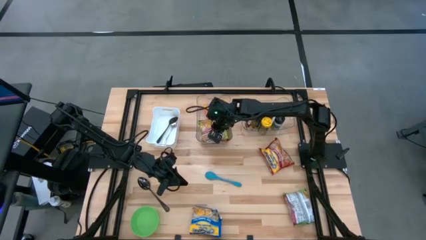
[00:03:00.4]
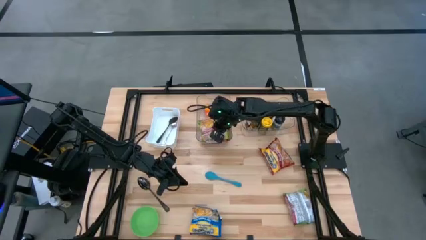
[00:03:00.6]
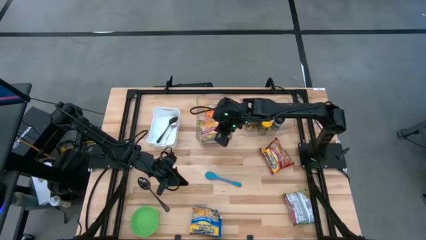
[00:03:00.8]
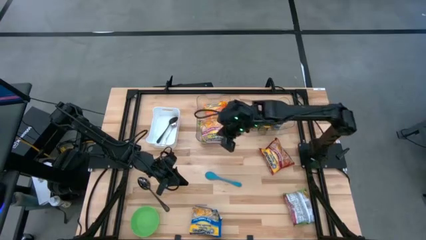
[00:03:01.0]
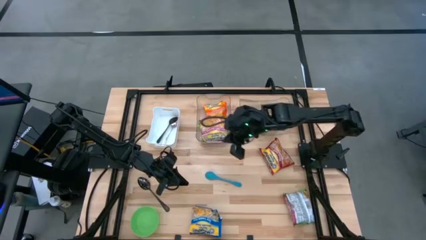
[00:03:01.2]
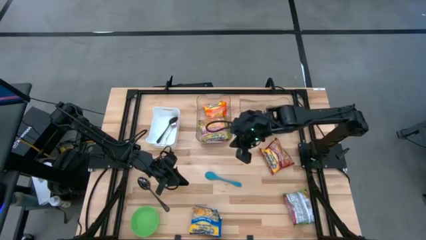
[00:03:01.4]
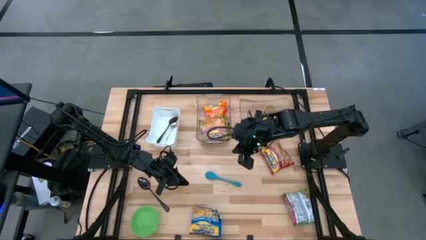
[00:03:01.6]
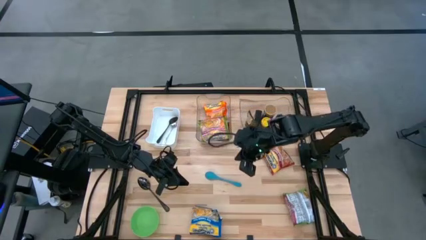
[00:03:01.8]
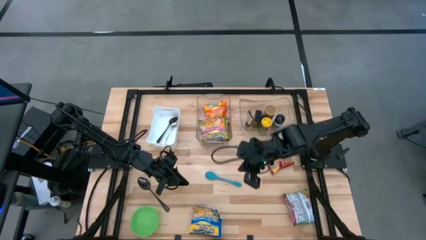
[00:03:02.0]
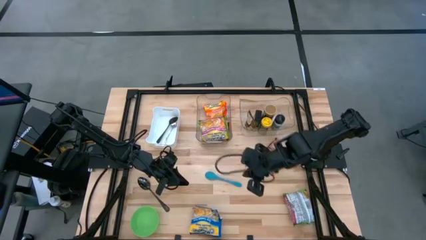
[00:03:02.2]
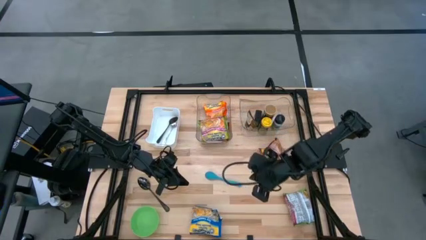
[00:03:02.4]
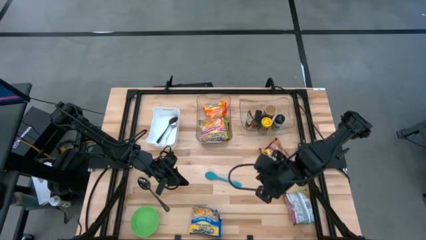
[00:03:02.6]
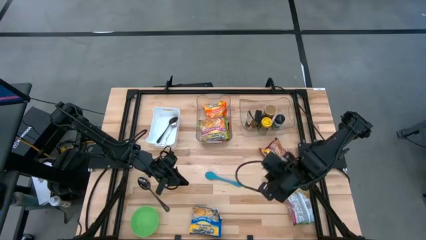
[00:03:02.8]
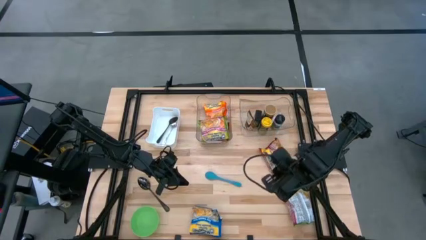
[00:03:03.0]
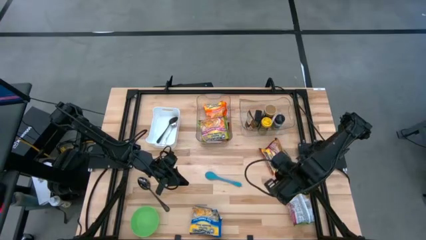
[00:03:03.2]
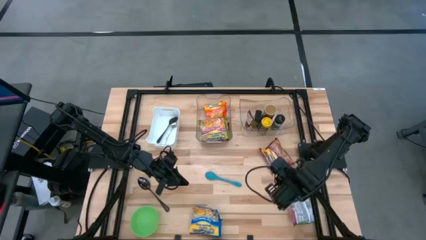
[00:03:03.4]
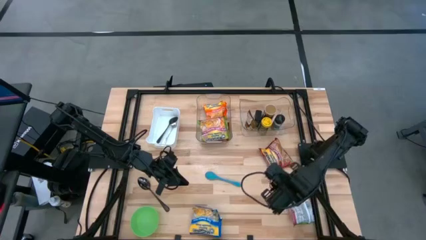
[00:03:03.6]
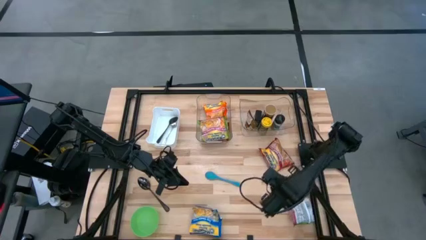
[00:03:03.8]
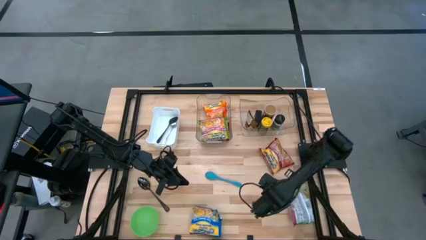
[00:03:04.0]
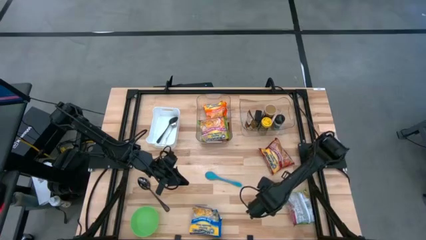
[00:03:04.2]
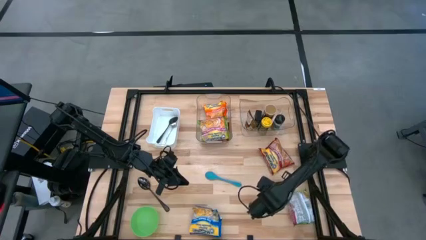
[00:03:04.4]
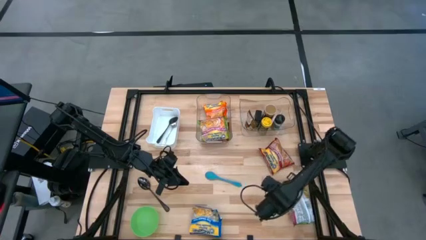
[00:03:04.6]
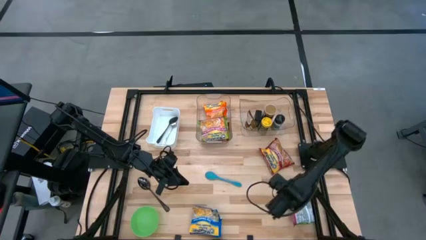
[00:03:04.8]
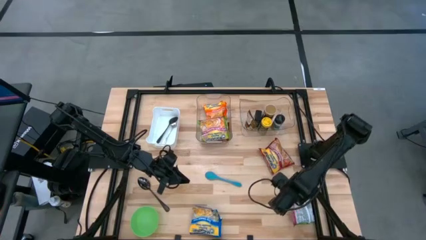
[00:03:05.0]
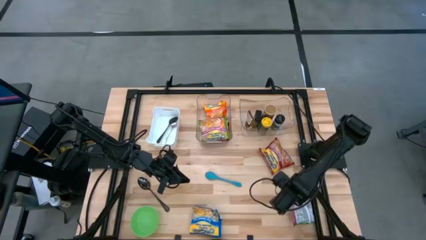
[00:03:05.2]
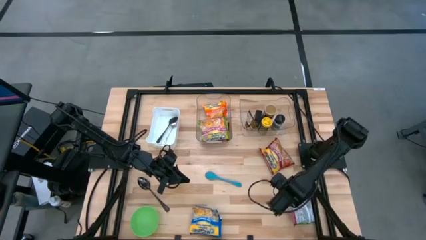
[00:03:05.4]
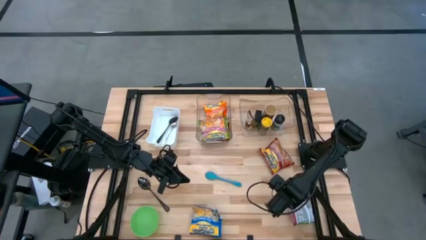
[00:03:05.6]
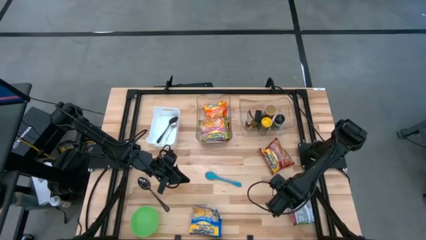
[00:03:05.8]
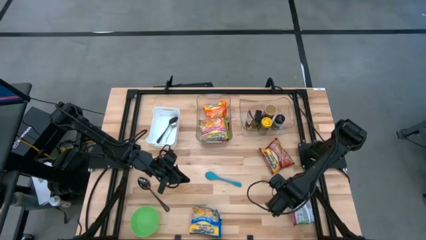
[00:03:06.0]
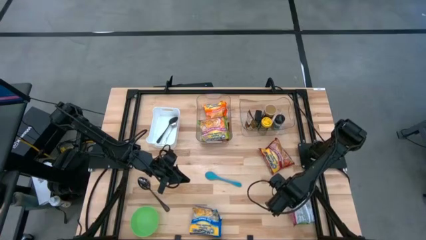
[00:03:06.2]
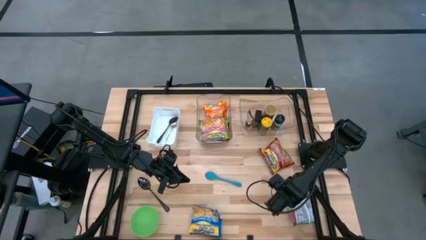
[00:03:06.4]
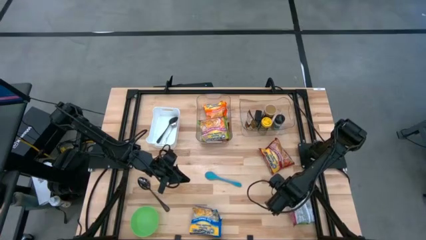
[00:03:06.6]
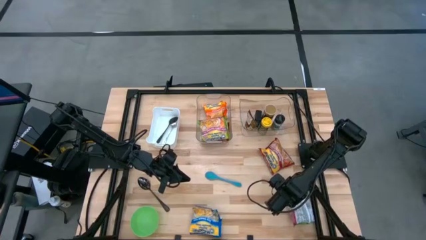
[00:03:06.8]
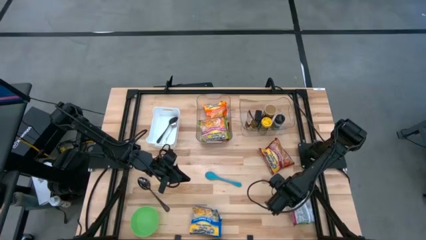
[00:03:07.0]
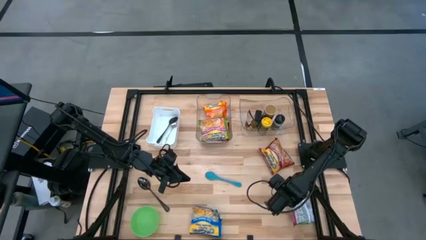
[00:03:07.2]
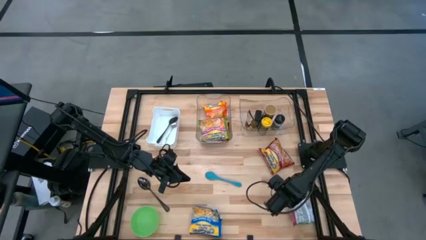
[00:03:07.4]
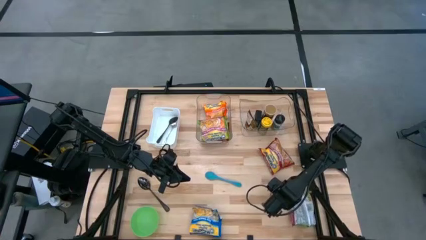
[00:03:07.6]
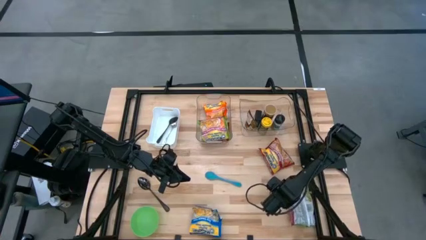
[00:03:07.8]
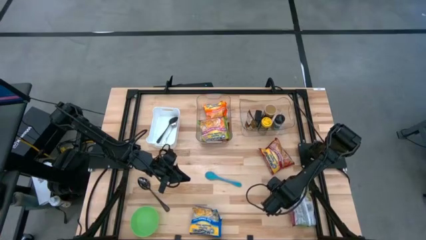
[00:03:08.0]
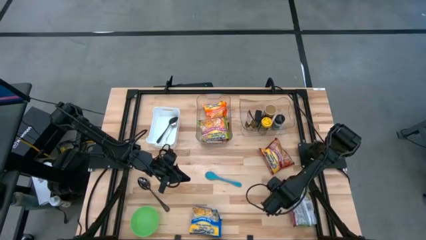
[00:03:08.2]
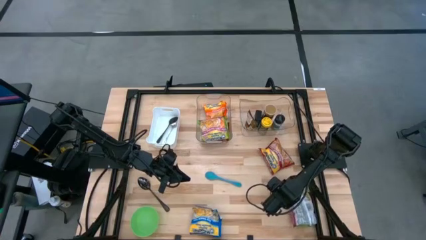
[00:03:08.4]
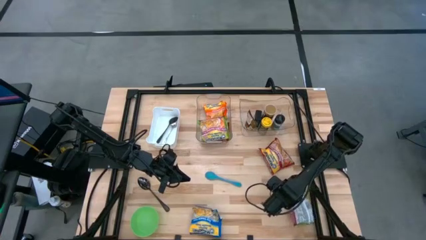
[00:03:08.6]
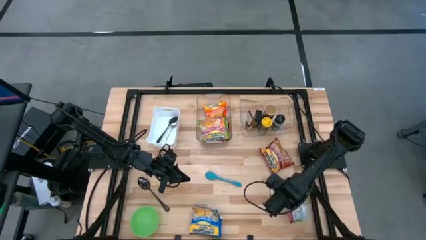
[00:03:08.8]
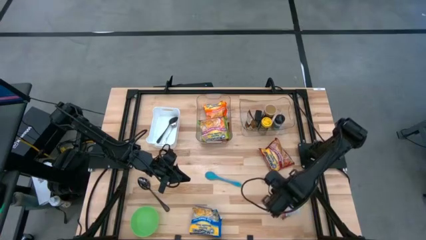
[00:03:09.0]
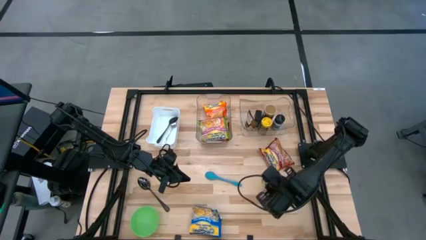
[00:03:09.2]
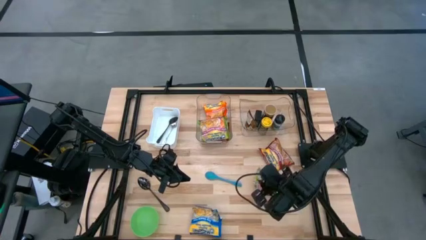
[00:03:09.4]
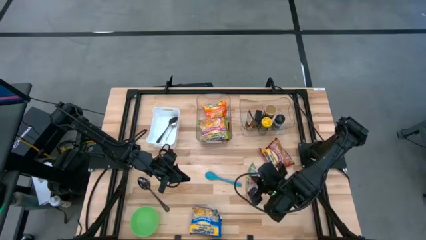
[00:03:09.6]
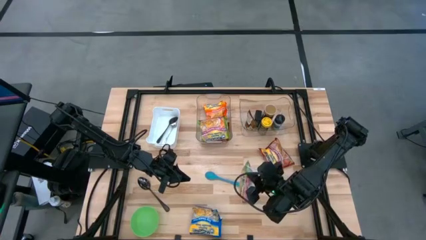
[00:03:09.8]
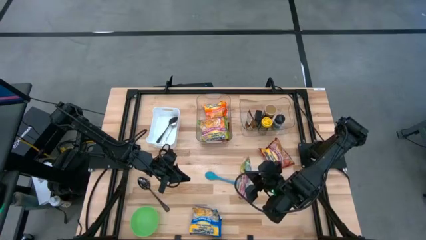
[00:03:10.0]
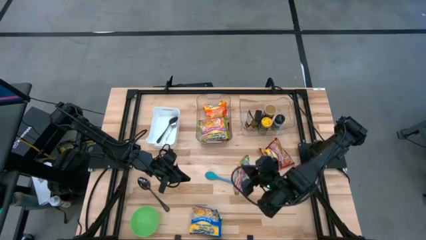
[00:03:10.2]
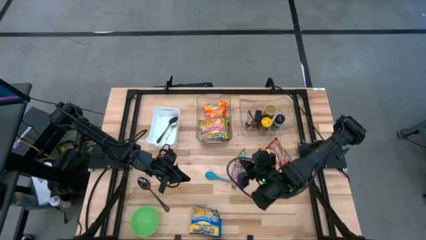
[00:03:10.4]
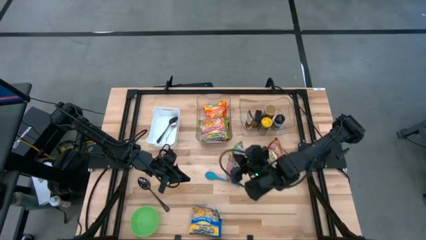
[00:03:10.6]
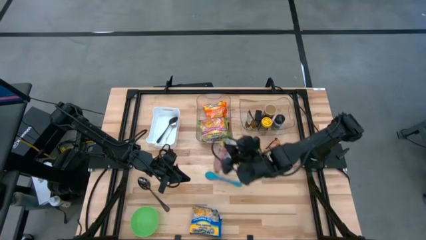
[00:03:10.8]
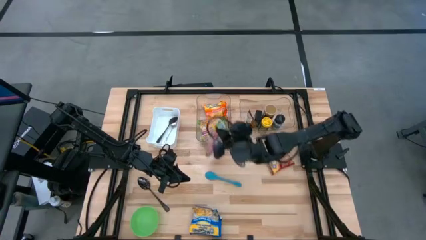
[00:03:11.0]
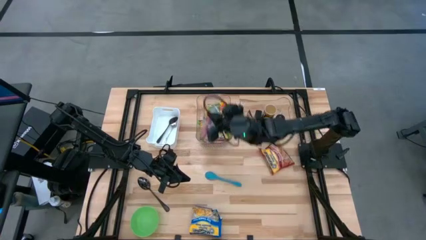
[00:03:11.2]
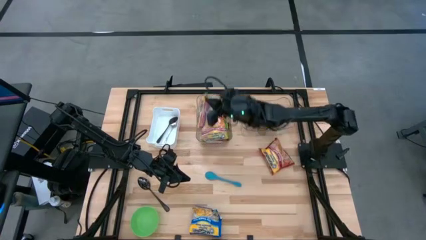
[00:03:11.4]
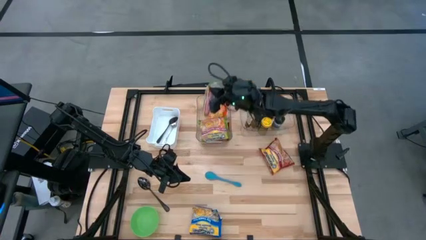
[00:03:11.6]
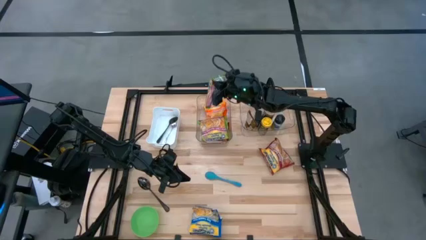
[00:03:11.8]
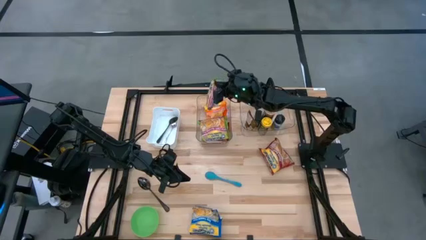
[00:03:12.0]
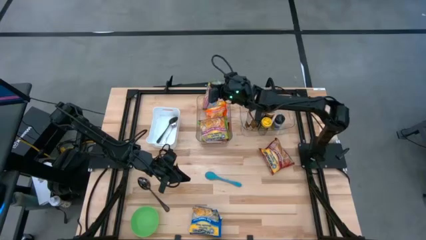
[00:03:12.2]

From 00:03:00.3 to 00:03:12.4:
Task: Pick & Place Food Item
Put the green noodle pack into the left transparent bin

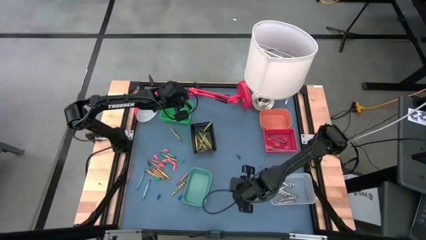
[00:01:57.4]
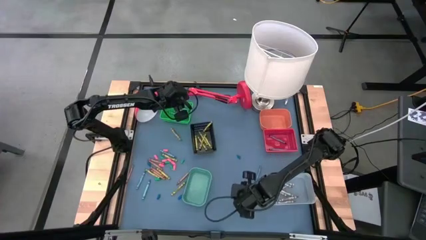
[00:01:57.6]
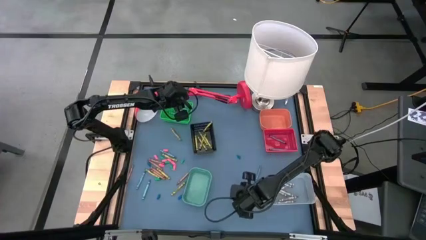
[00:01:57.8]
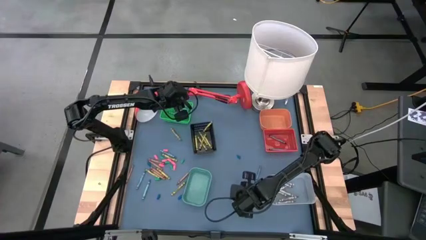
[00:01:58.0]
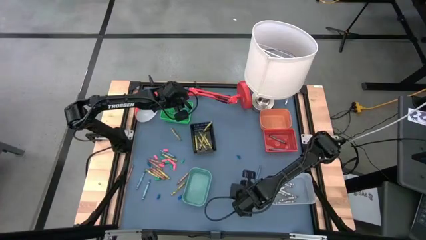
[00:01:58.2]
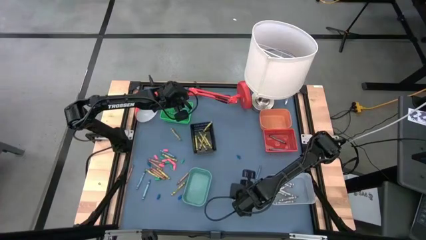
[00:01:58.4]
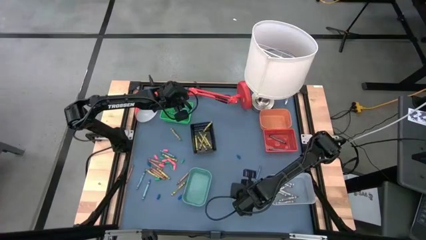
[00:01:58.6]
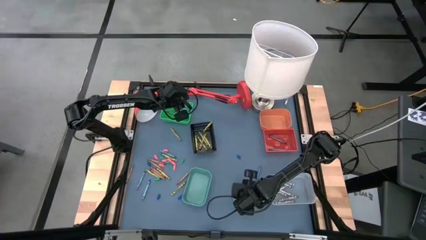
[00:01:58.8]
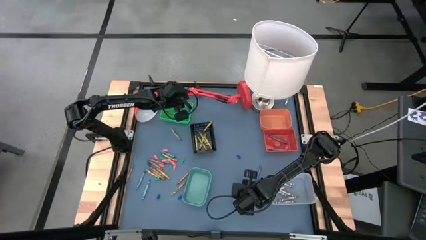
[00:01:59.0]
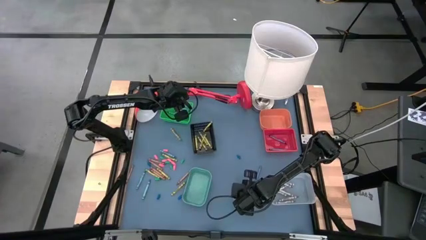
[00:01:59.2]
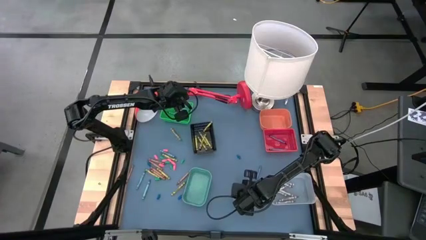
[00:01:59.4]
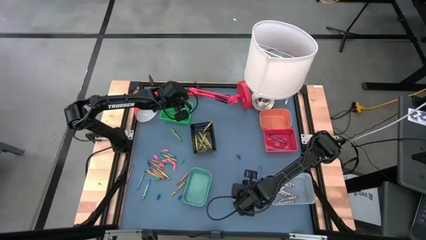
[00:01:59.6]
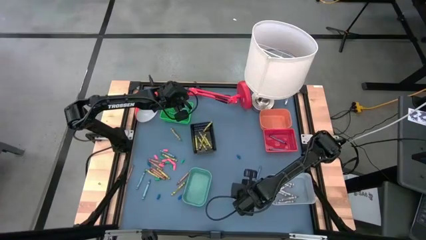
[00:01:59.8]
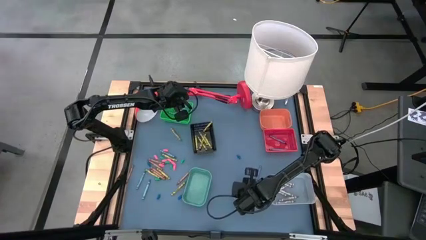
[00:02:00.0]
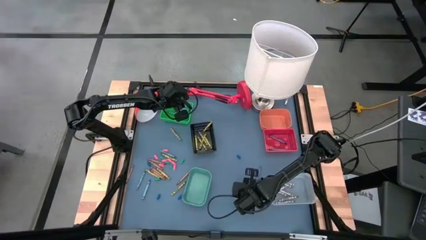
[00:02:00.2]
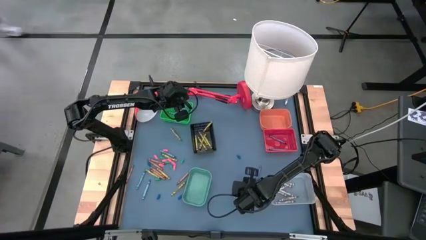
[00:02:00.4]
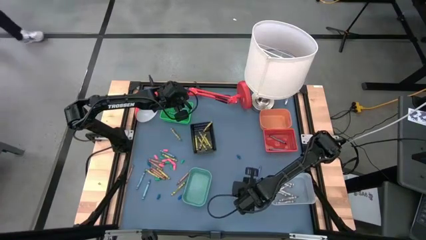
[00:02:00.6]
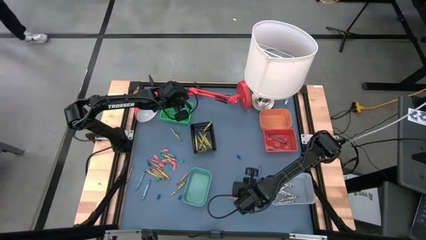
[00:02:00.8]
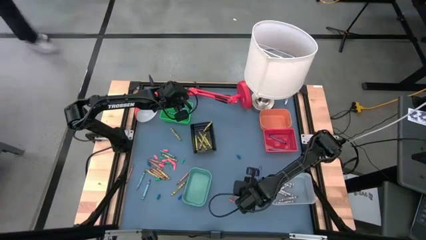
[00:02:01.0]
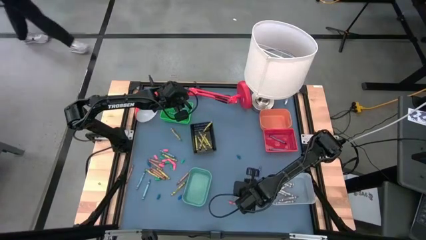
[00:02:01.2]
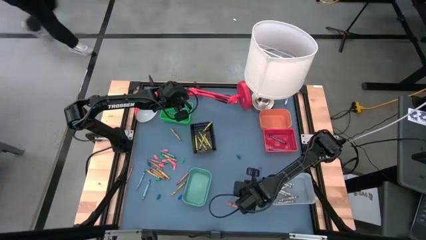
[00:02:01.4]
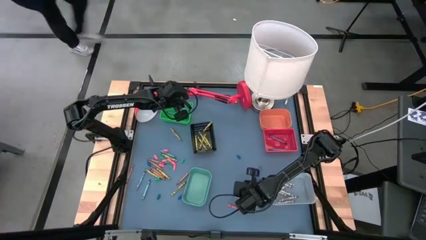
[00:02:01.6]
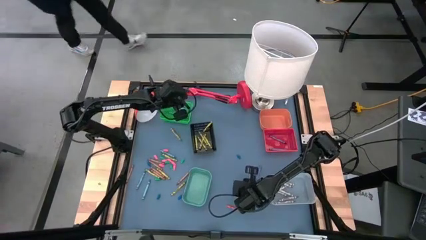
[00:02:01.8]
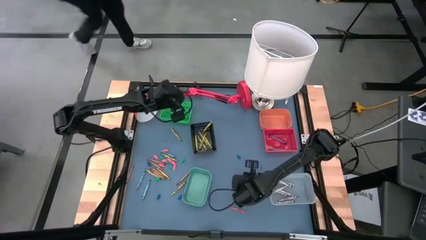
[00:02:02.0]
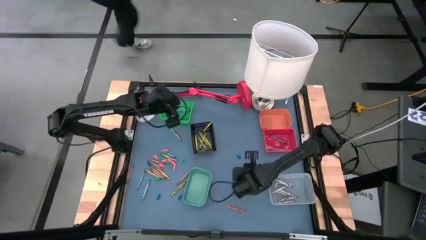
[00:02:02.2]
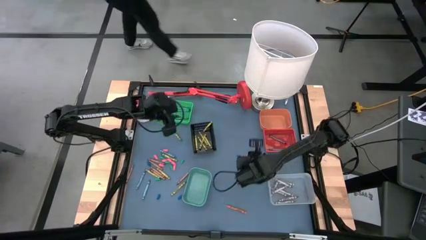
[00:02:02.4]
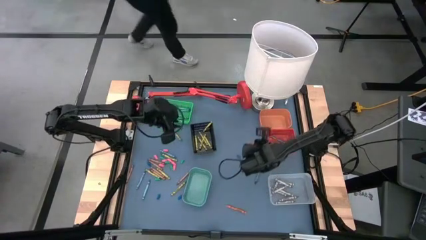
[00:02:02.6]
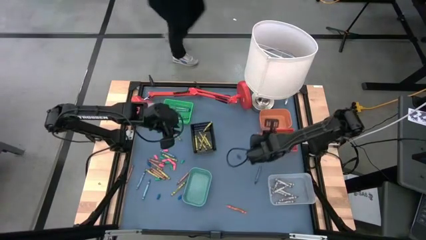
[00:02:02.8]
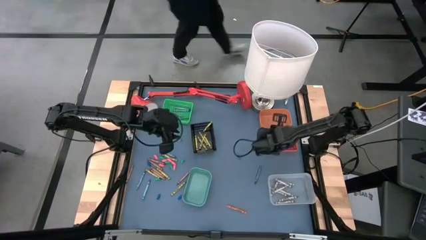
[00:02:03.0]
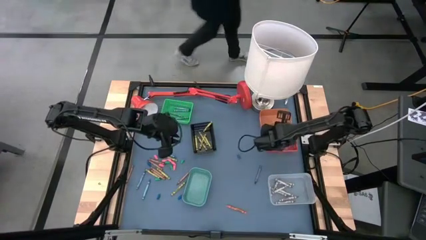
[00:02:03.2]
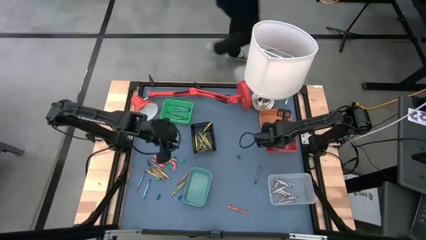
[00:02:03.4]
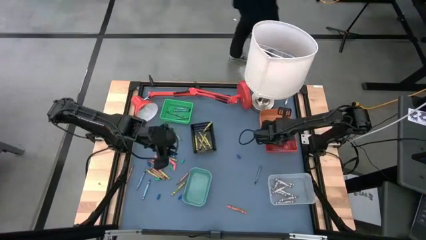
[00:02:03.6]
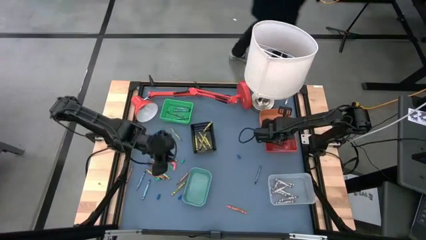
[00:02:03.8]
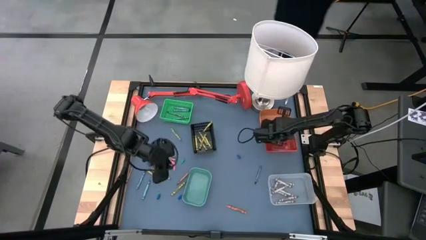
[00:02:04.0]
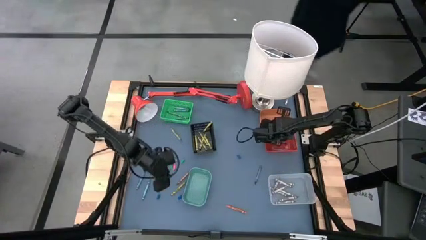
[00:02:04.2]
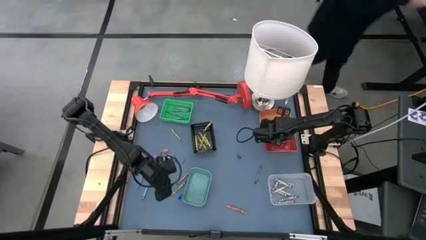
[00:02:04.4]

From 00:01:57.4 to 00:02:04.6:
Task: Sort crayons
Put the orange crayon into the orange bin
